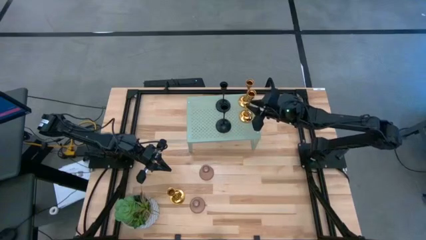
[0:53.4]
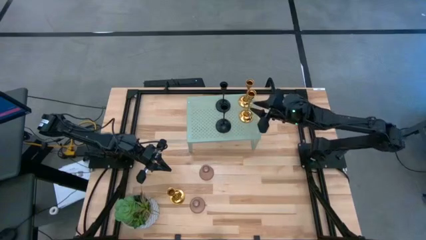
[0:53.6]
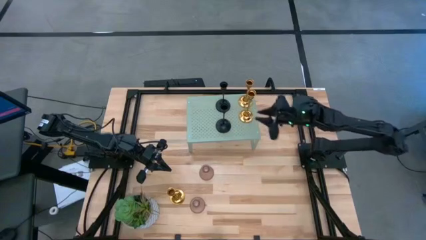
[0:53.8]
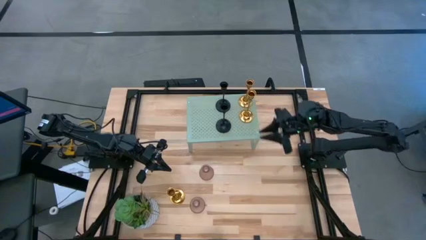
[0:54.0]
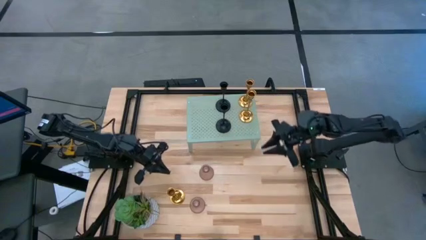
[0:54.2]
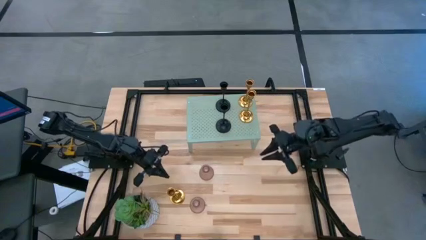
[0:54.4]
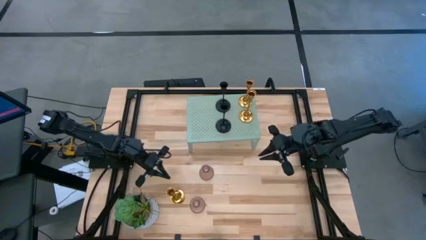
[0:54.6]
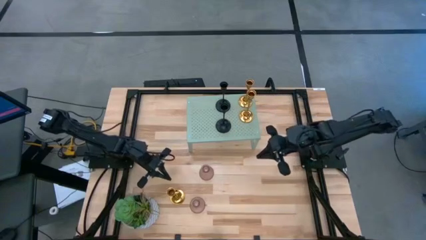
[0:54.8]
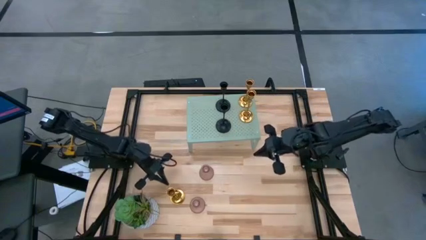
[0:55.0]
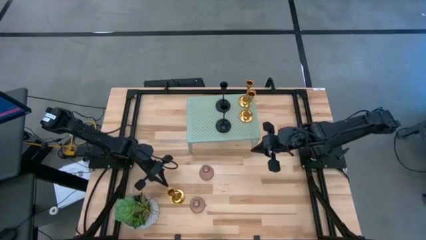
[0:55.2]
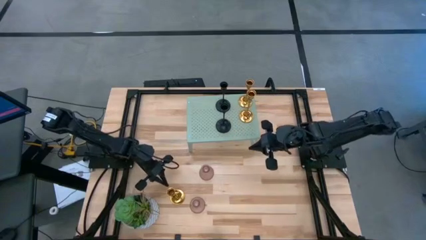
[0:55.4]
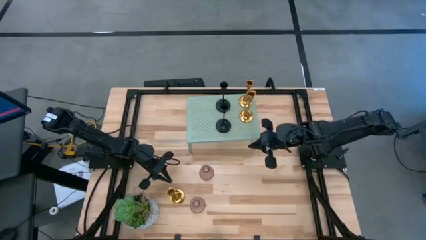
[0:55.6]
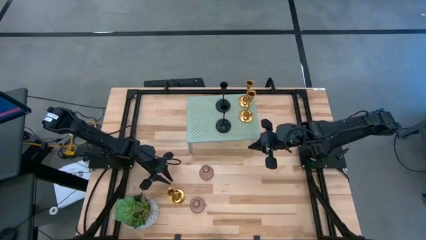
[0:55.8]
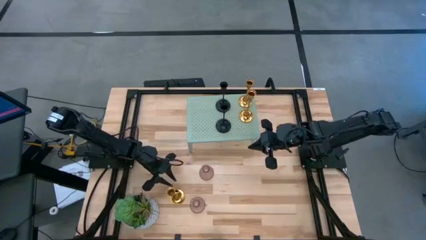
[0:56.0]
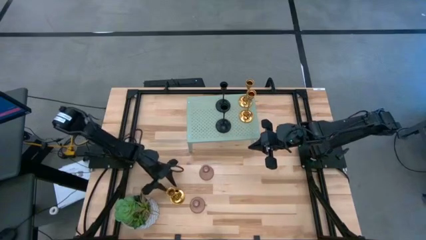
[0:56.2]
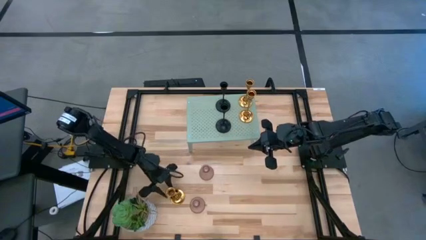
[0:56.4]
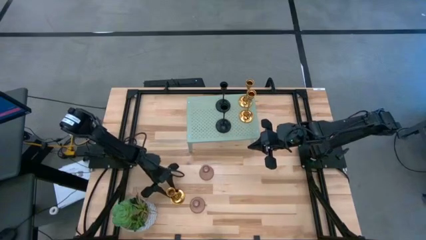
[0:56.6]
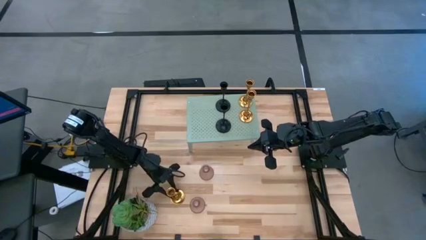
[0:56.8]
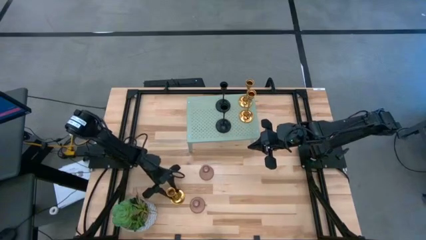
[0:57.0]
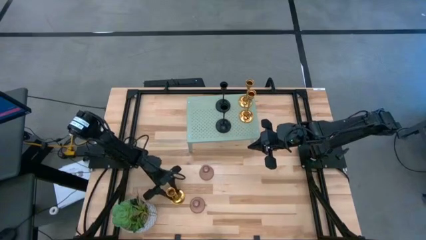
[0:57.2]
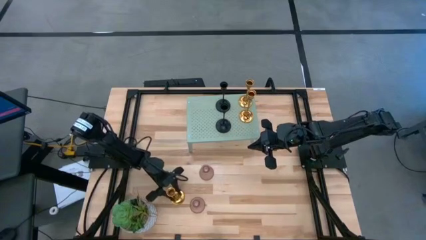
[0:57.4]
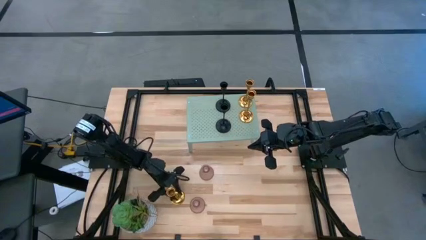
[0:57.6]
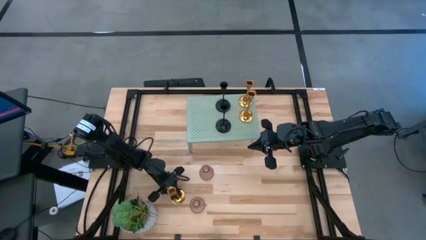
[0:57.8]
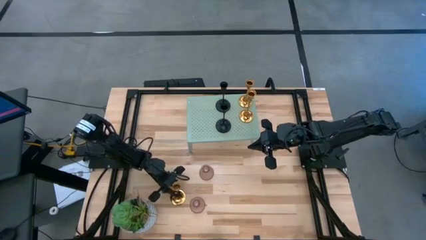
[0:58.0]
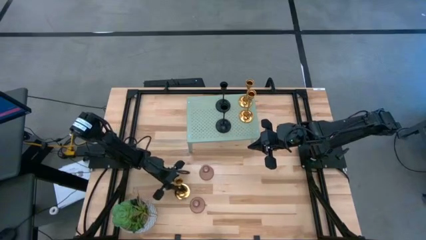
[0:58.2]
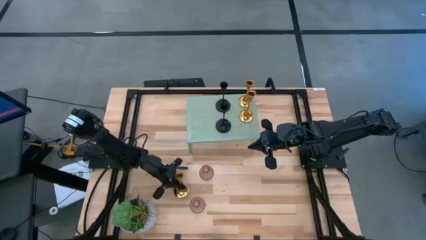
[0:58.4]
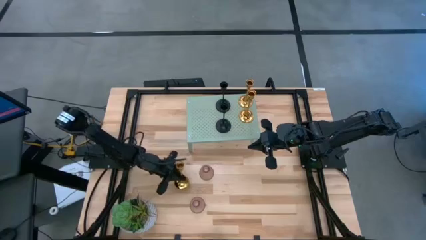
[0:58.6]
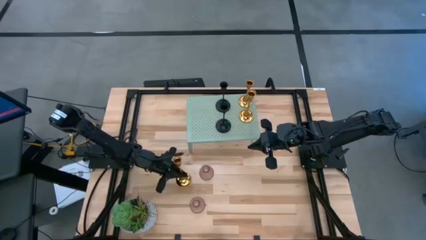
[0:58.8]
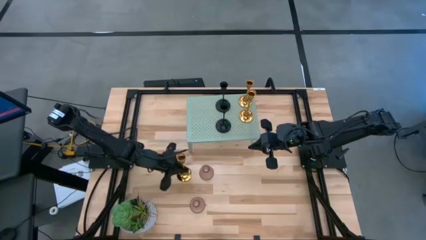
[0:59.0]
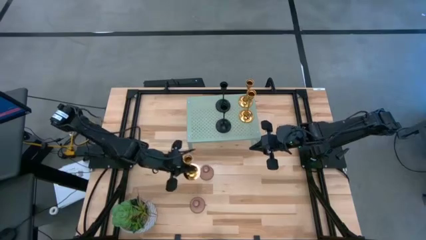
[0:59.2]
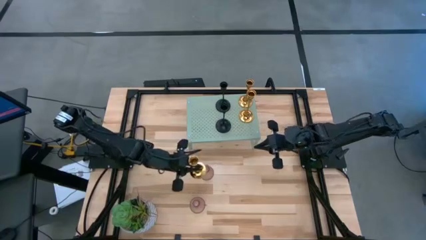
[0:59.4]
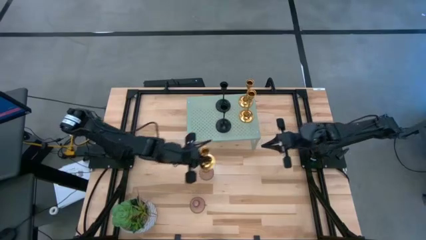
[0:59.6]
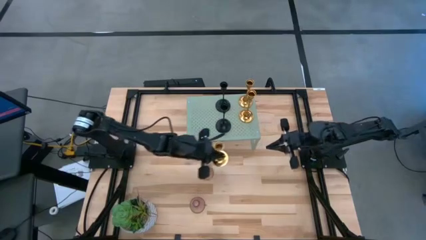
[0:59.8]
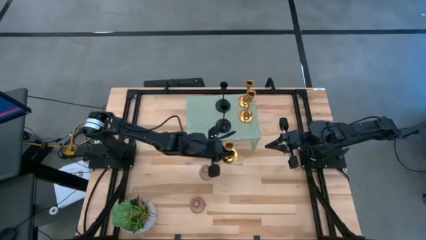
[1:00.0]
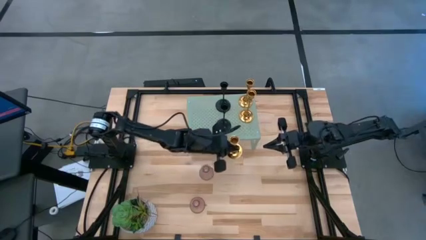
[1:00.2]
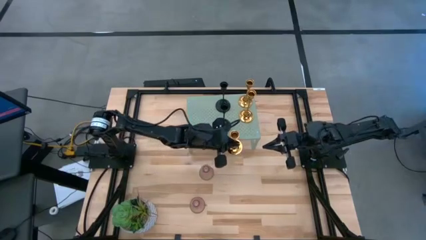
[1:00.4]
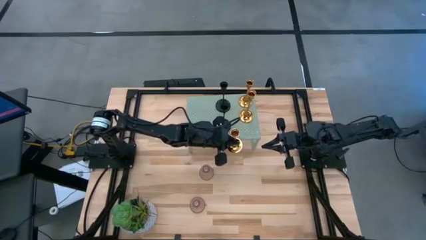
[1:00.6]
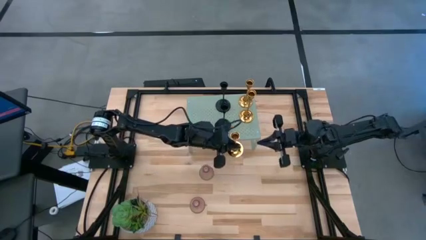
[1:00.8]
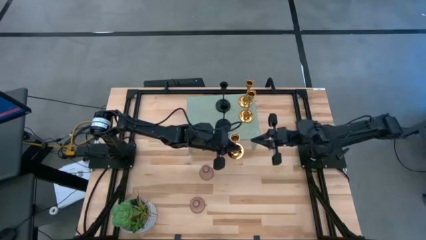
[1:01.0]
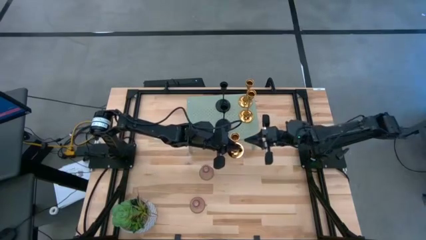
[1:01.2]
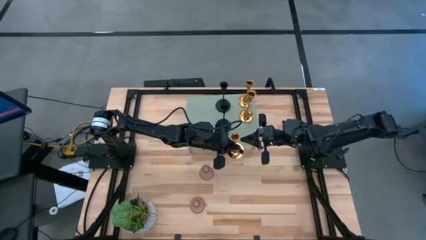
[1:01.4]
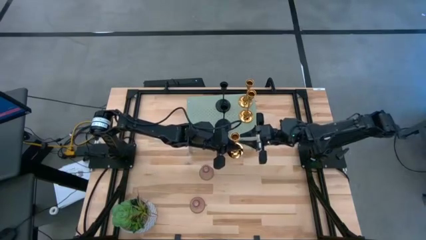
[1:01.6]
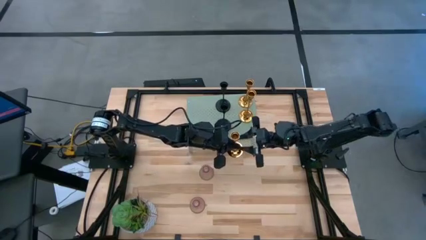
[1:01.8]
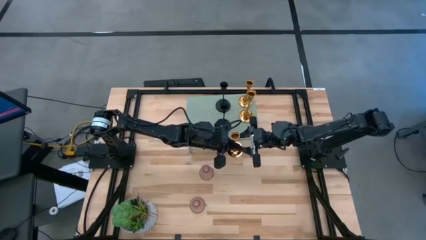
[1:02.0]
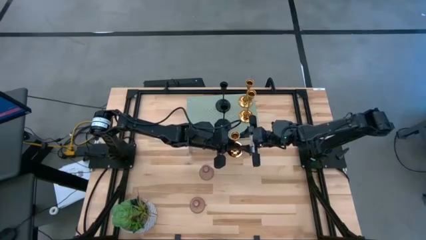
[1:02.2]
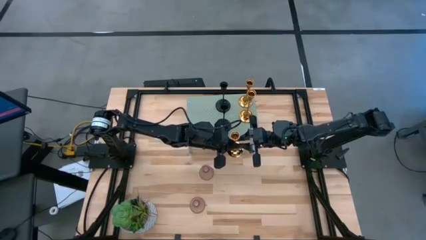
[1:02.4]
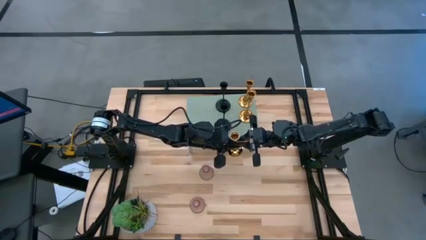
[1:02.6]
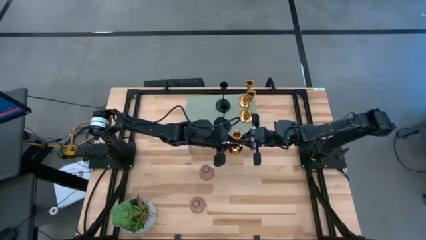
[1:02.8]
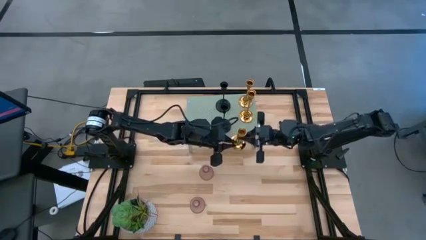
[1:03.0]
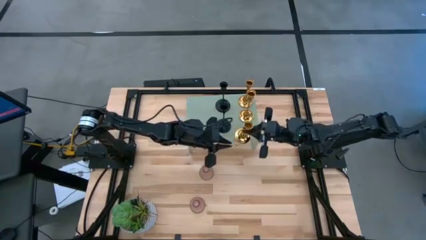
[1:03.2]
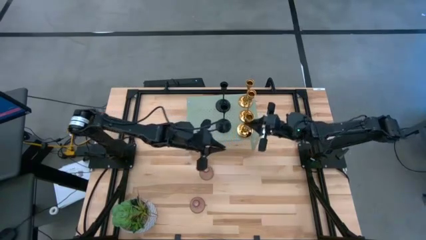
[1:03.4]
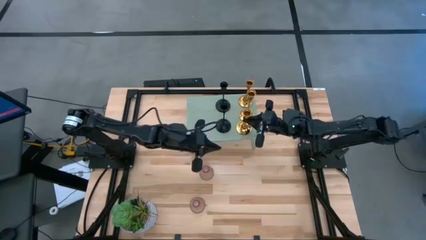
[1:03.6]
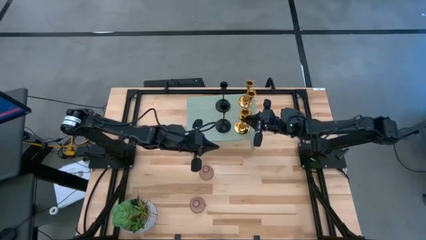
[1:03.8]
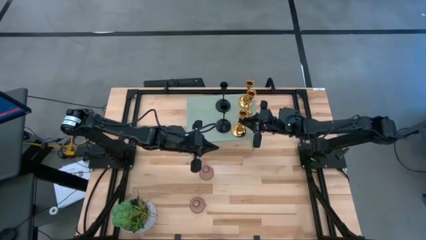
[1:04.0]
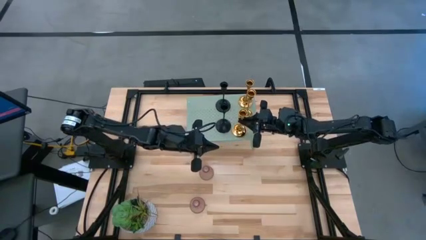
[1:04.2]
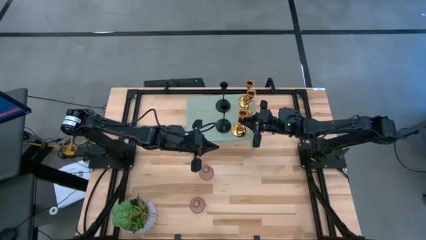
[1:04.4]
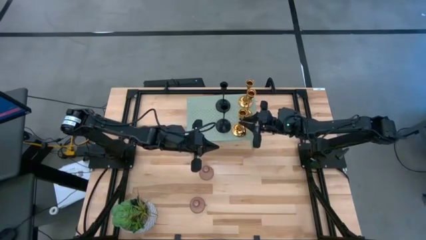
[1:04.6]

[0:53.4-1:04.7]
Task: Pick & Place candle stick holders
Put the gold candle holder on the shelf aligned with the other gold candle holders

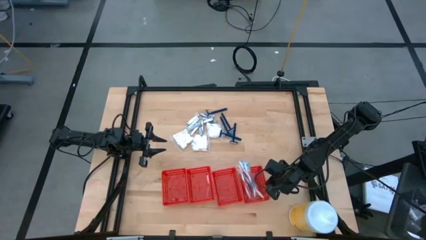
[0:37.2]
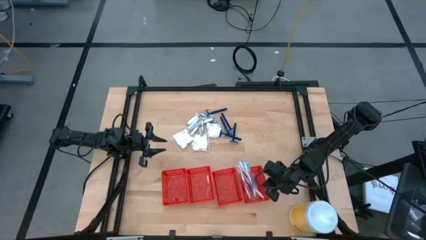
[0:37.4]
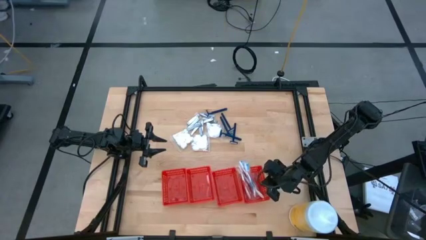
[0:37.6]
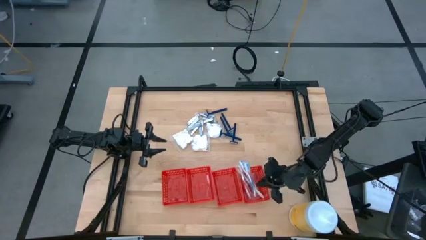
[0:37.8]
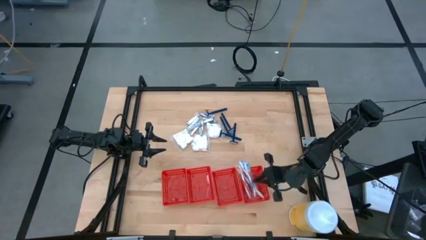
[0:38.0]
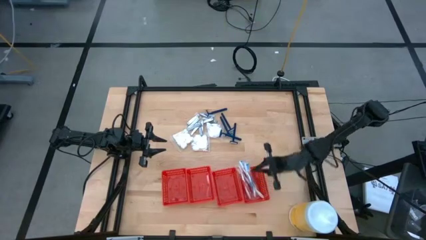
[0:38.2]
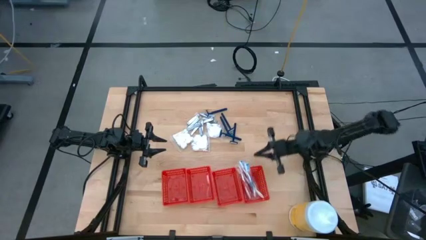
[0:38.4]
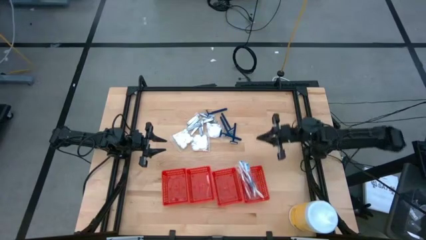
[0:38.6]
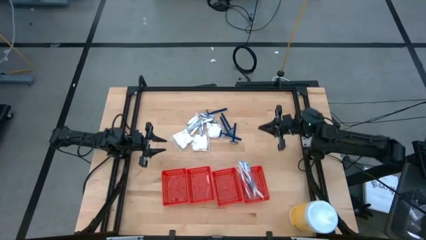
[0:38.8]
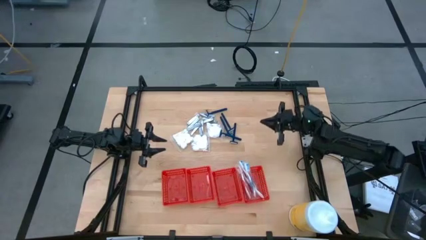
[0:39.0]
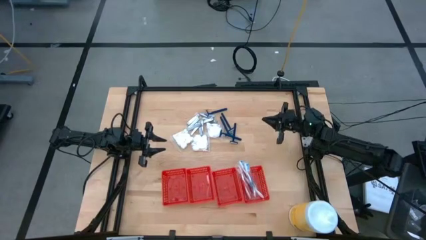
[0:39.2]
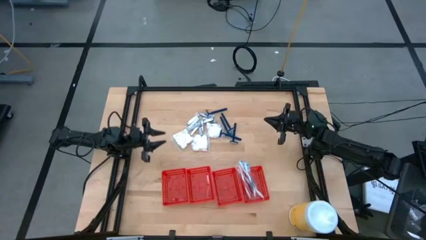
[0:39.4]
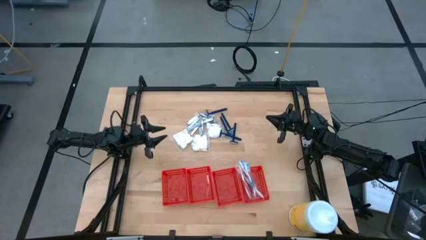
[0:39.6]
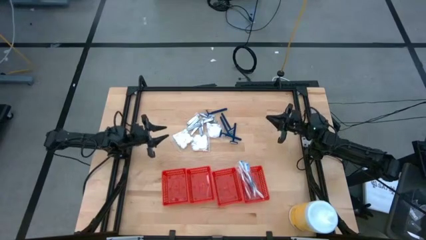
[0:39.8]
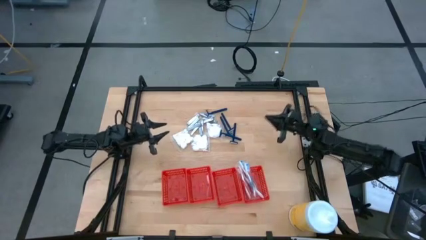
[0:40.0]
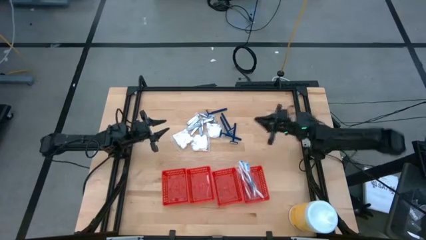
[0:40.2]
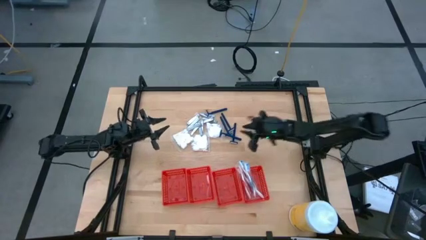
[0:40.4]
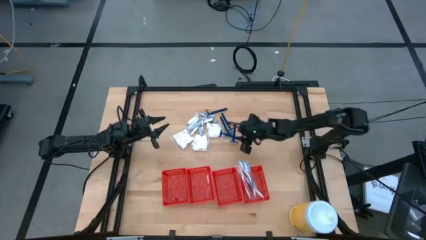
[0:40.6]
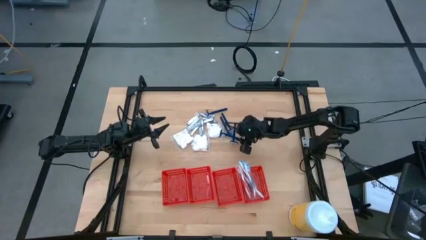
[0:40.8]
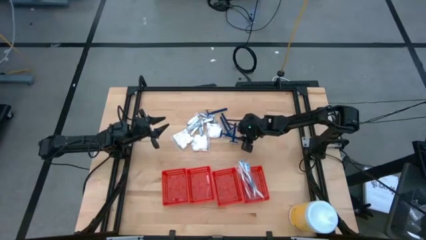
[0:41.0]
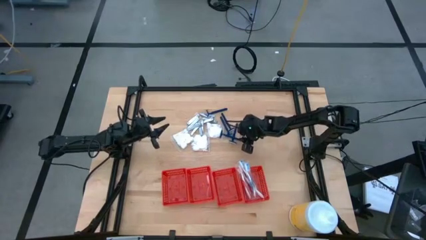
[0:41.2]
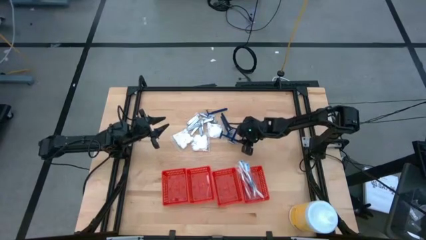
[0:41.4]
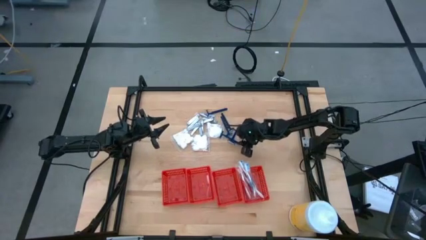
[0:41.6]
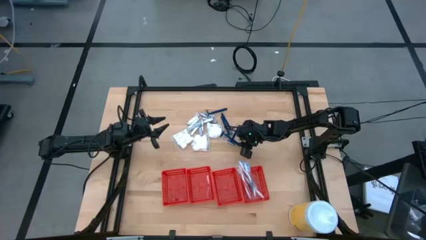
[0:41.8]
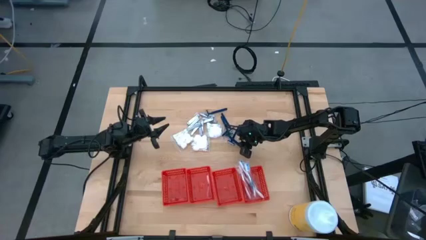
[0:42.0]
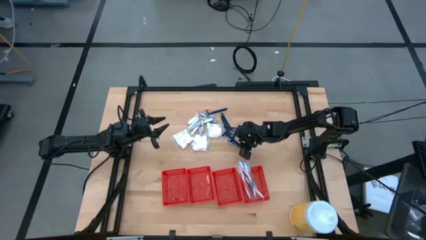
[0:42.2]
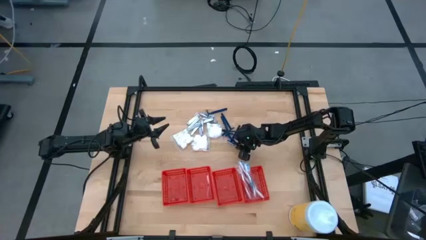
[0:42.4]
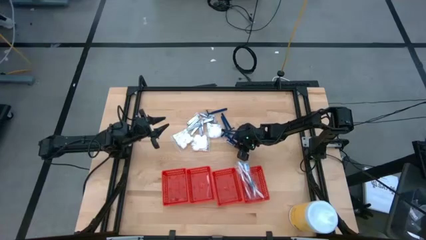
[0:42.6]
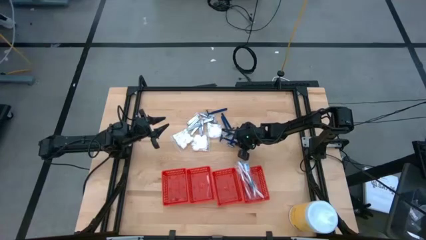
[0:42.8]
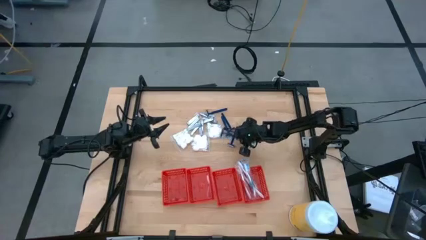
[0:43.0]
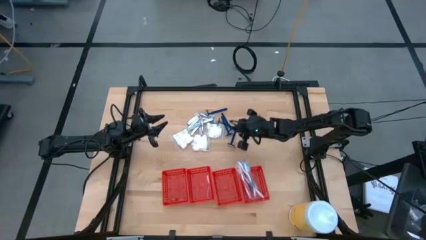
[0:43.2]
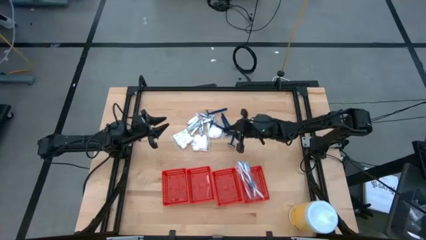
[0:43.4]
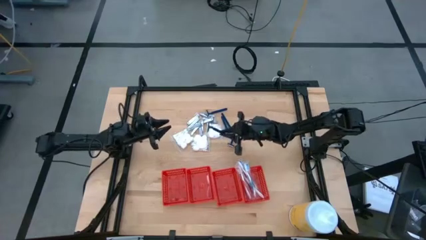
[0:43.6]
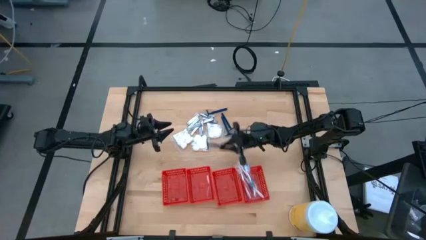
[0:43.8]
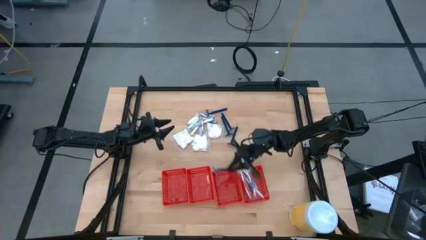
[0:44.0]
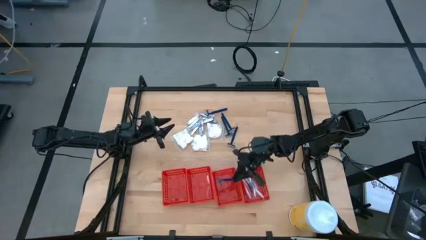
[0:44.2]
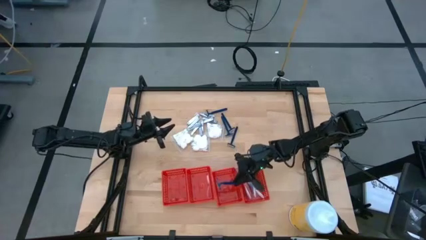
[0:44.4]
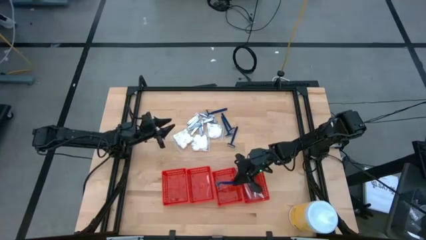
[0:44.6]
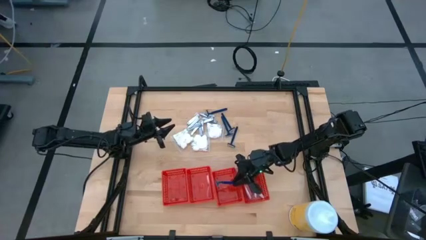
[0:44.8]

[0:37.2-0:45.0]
Task: Pick & Place Travel size toiletries
Put the blue razor into the middle right red bin
